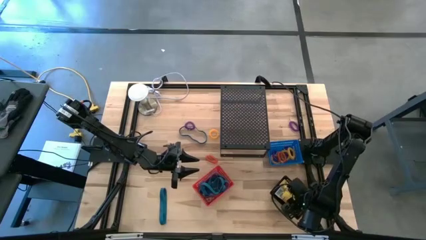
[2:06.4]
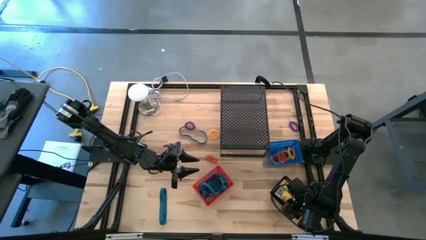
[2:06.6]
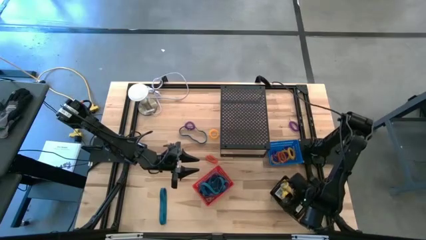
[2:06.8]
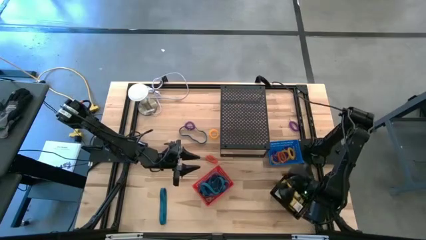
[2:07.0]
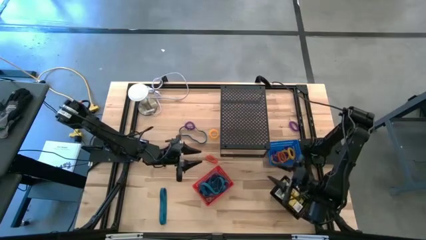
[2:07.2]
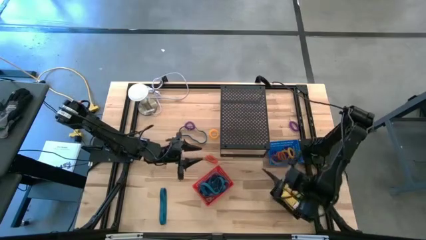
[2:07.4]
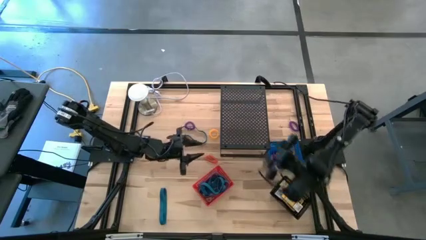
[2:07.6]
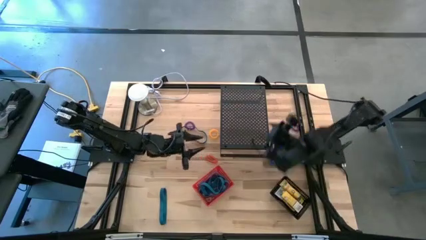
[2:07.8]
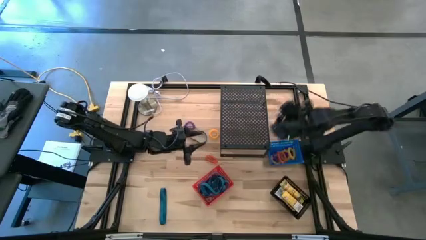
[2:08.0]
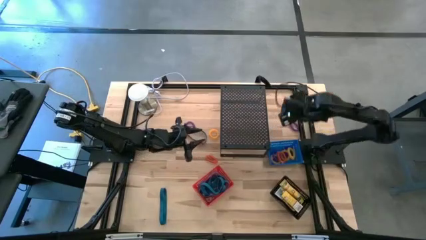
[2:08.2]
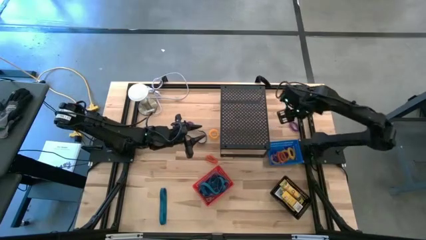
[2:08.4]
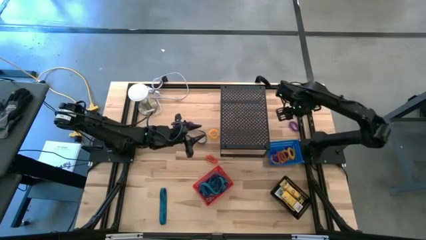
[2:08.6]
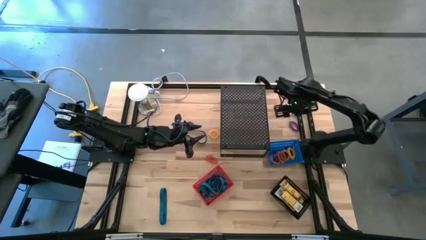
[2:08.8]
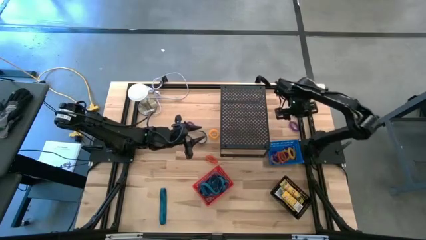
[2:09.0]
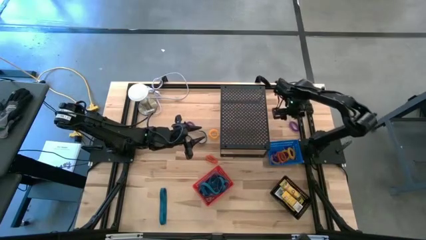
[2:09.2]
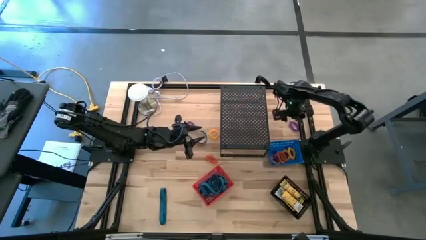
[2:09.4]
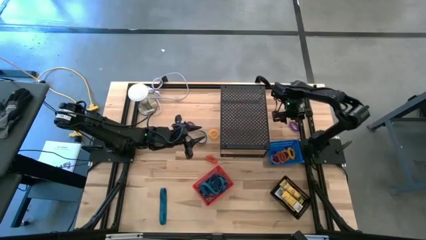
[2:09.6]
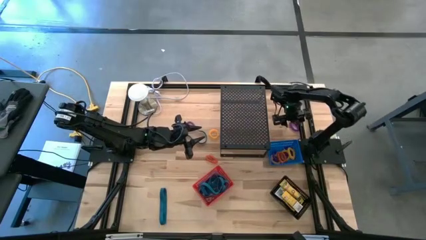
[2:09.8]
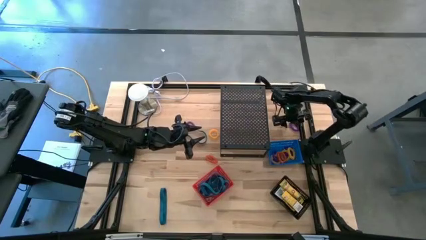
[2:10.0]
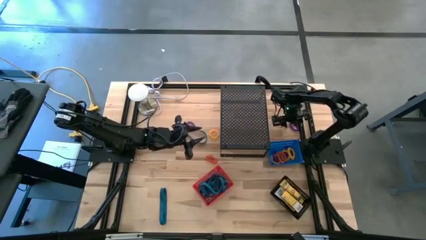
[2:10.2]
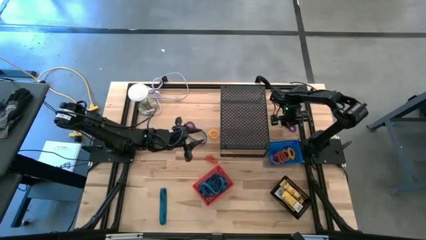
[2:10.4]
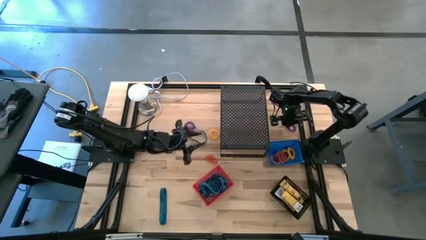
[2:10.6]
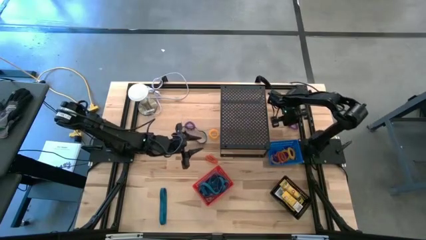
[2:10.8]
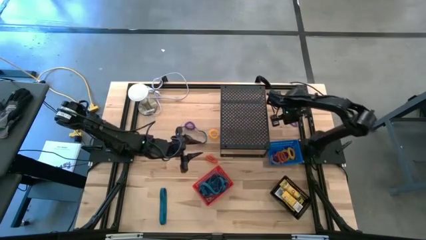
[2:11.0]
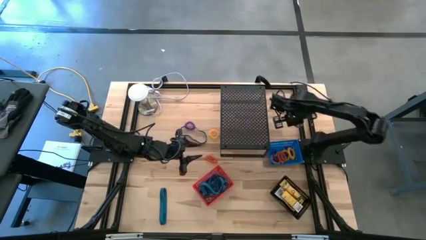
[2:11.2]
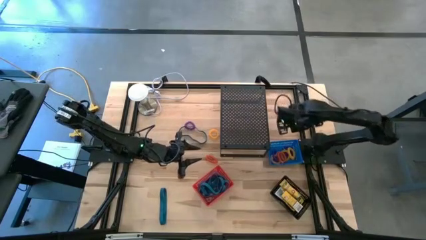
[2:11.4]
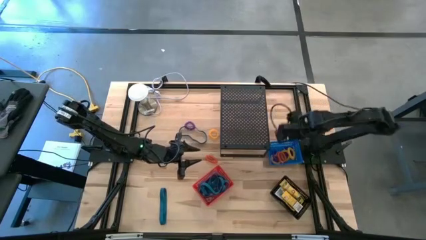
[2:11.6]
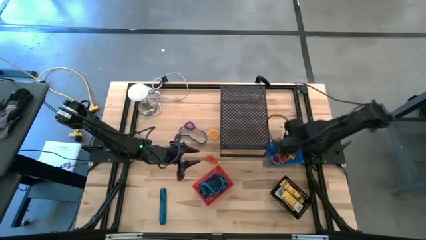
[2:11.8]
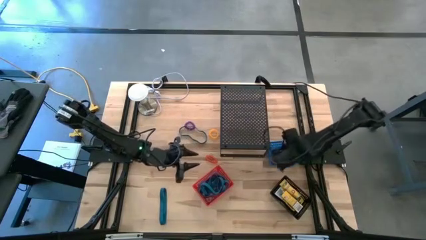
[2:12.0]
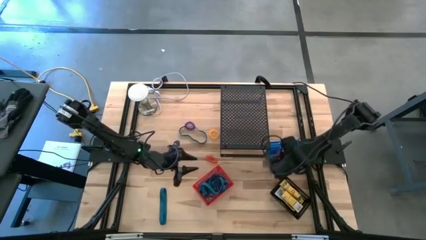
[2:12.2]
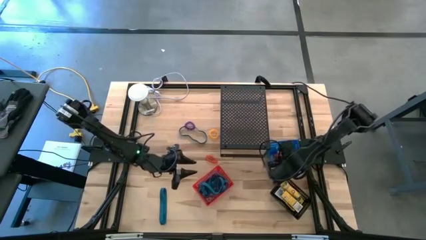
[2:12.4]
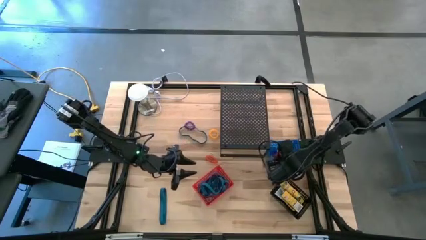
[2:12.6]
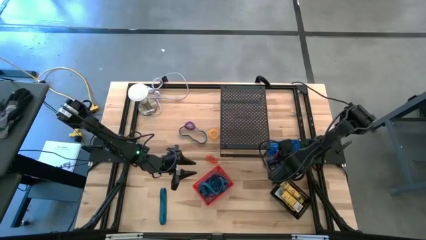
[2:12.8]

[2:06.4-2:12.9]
Task: Pick & Place Office Desk Supplies
Put the purple spring keychain into the blue basket

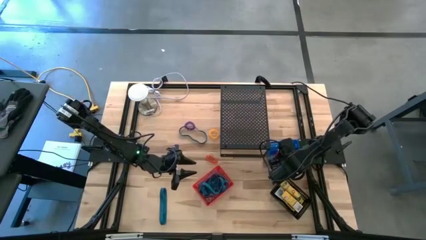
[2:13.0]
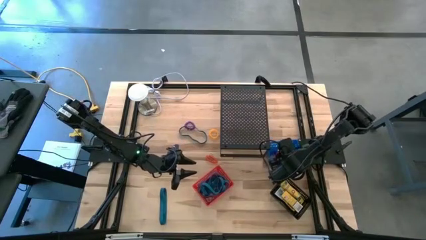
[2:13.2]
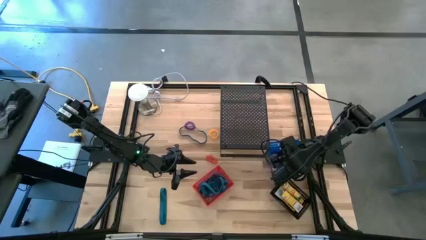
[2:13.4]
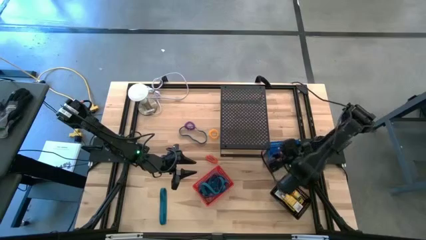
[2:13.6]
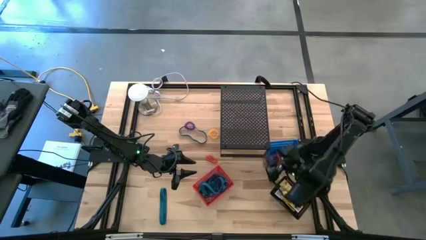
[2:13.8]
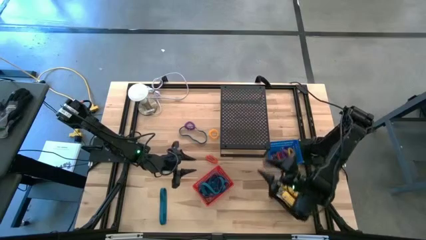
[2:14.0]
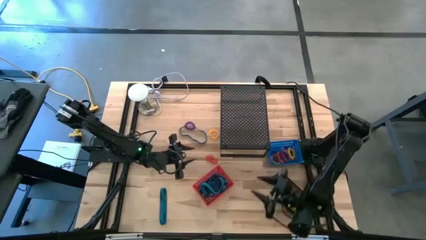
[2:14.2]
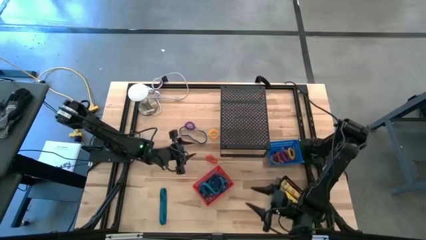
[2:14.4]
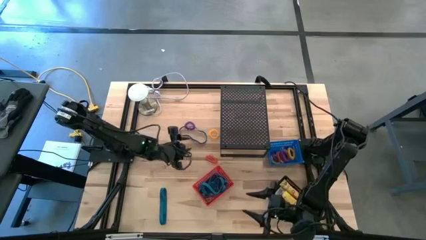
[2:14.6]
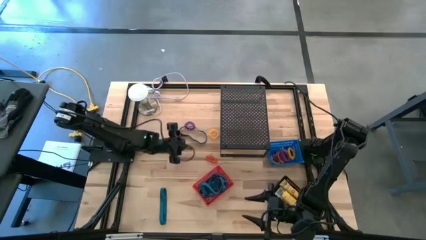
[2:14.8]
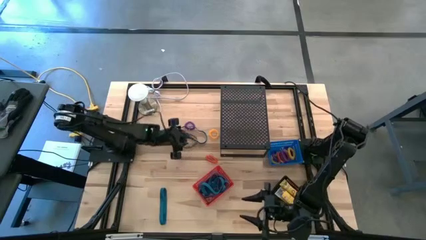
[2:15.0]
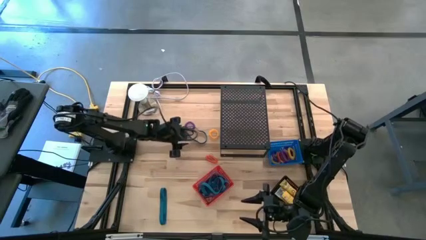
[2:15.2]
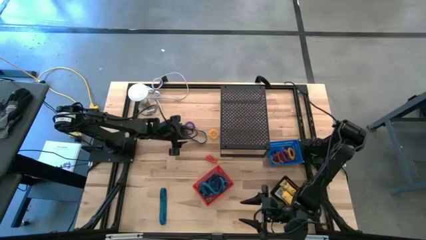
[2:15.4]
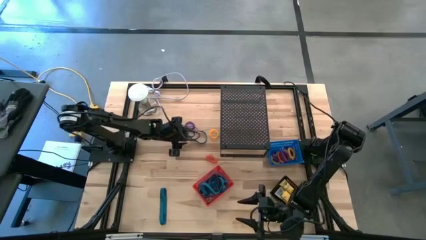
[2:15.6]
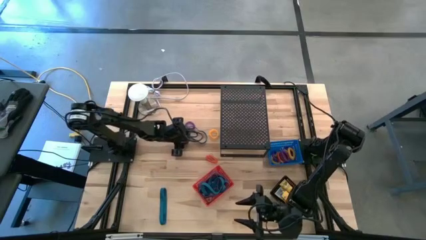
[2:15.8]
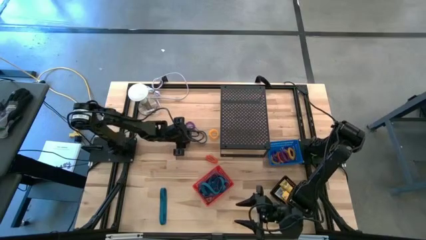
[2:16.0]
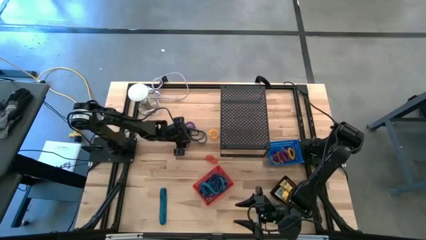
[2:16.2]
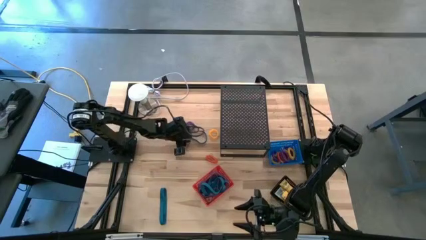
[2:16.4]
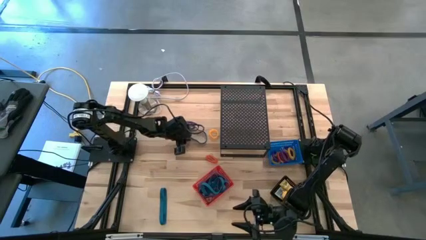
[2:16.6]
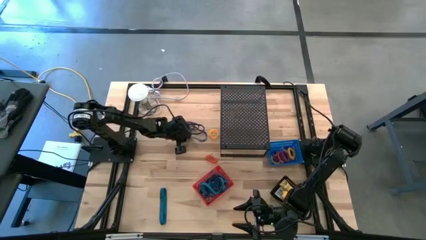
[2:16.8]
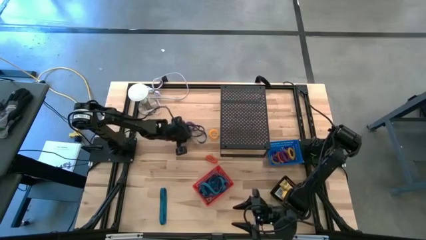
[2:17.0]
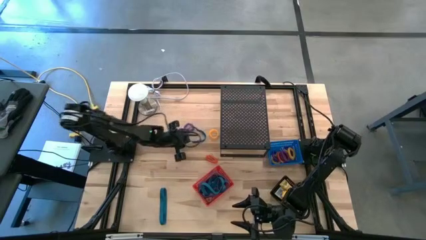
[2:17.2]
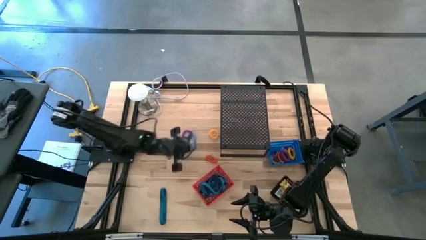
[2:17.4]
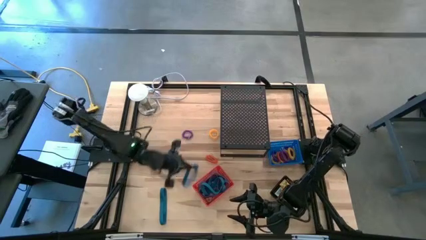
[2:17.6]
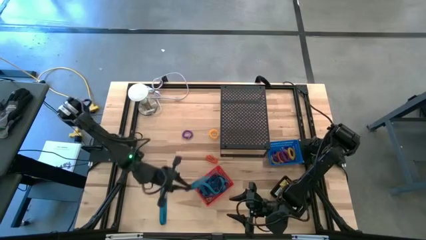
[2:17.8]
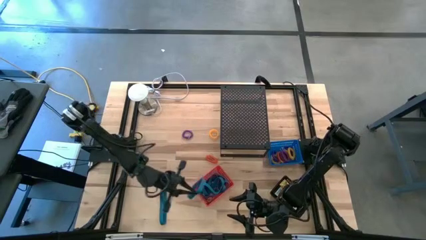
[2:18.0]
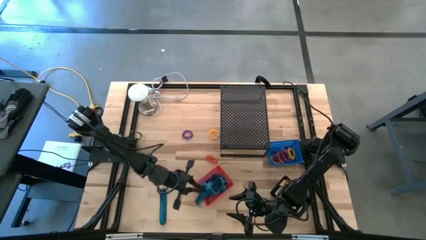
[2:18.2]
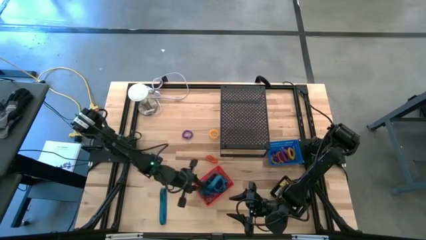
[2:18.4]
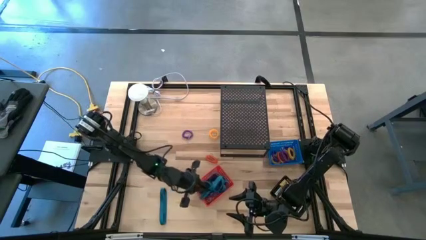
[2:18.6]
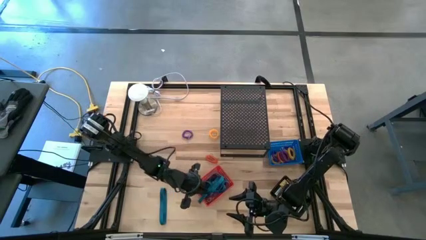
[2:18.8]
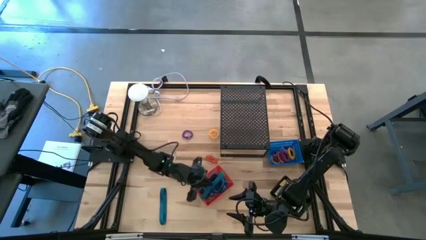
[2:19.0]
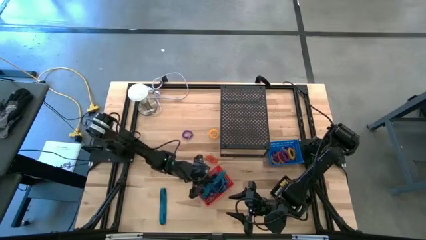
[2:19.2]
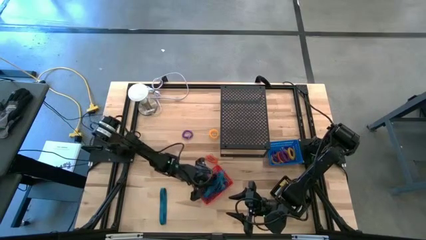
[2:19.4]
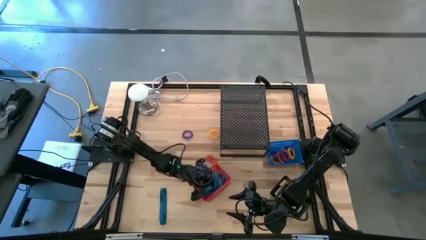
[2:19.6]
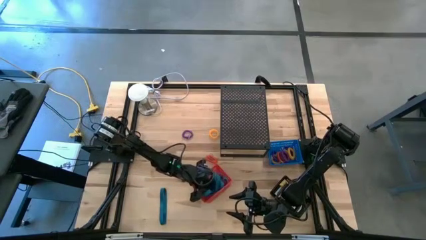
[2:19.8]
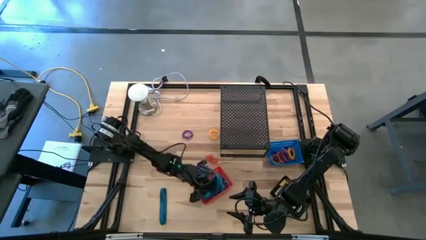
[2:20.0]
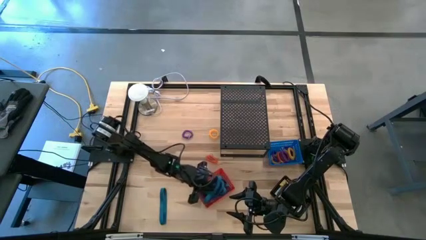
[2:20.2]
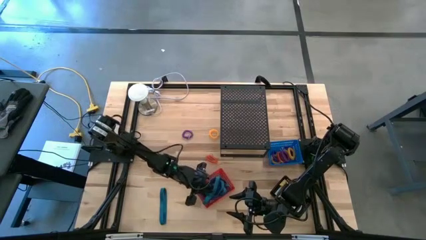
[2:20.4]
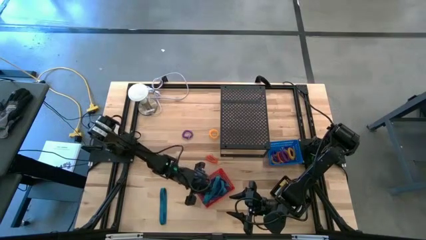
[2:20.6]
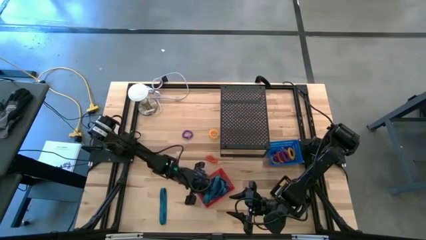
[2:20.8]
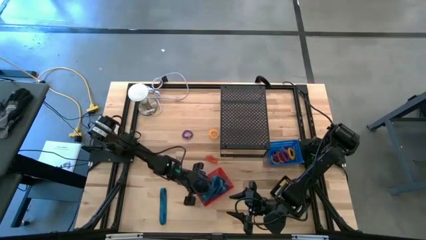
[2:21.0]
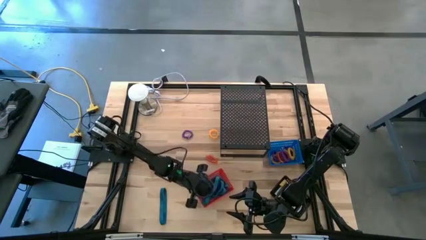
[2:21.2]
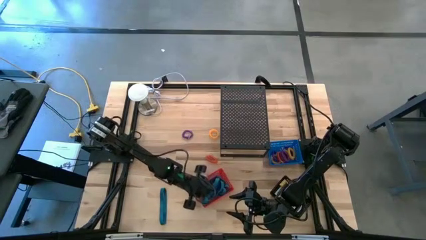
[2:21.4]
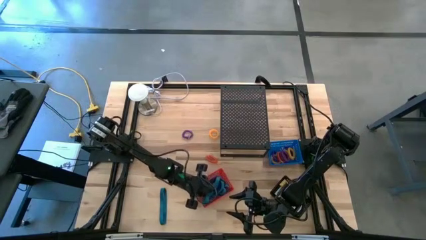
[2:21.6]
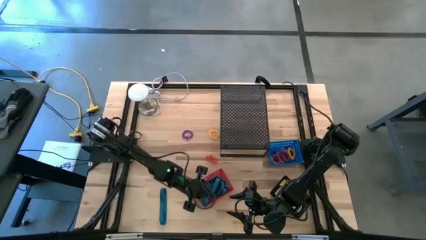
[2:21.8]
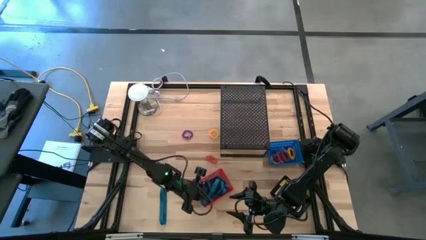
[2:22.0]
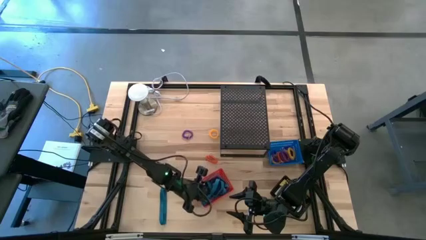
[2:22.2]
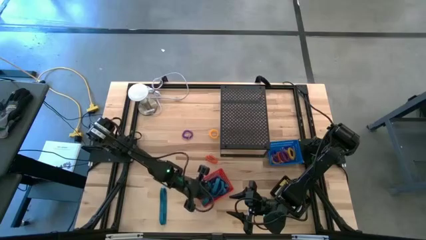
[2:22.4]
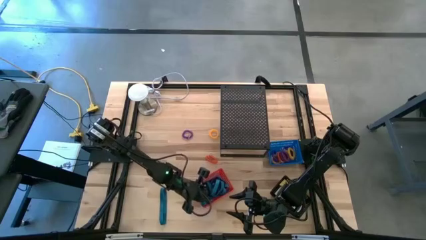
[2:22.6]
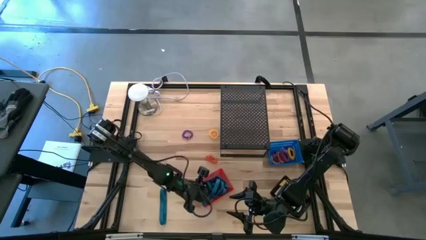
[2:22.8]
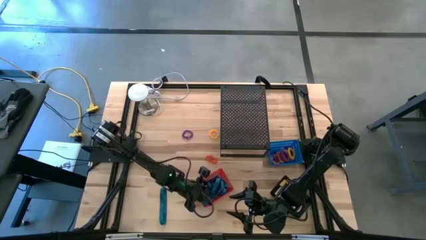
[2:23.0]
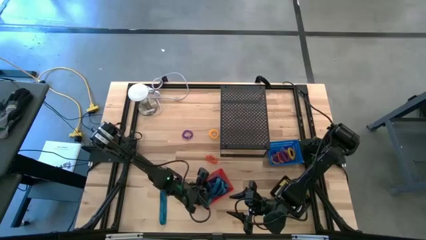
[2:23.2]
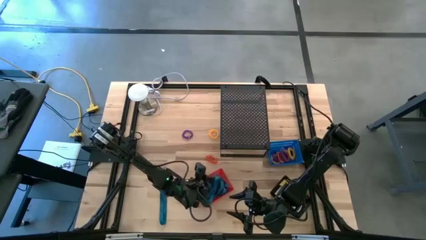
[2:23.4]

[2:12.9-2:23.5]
Put the blue rubberband into the red basket
